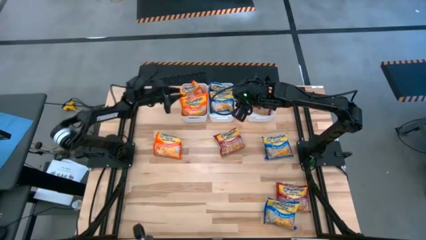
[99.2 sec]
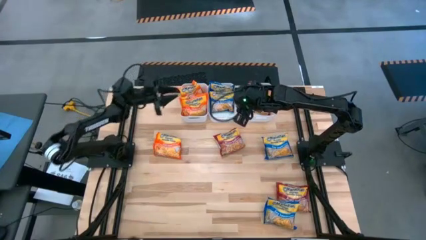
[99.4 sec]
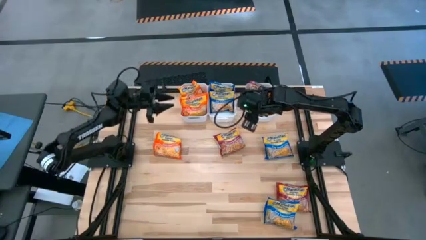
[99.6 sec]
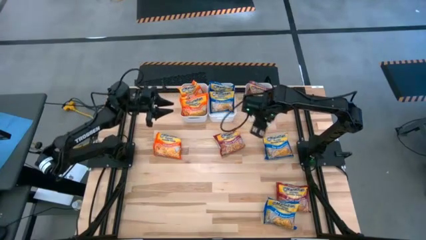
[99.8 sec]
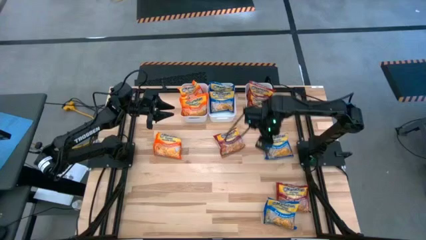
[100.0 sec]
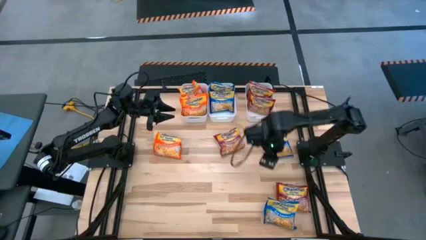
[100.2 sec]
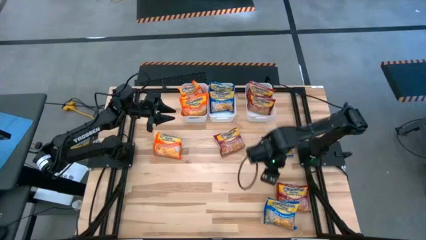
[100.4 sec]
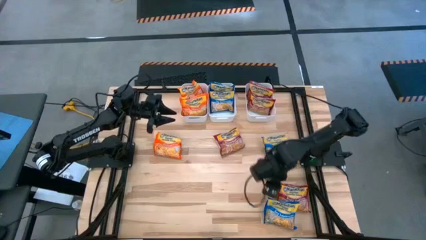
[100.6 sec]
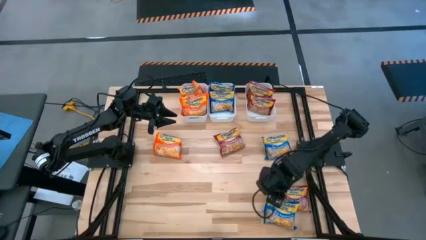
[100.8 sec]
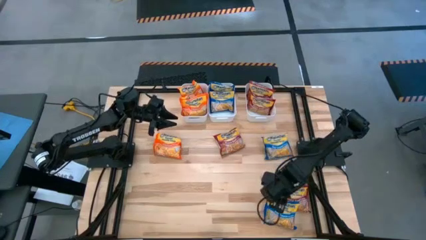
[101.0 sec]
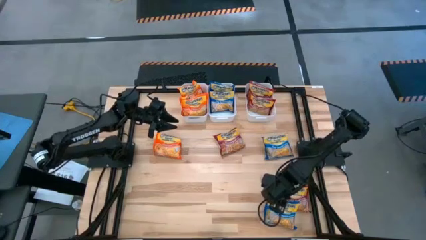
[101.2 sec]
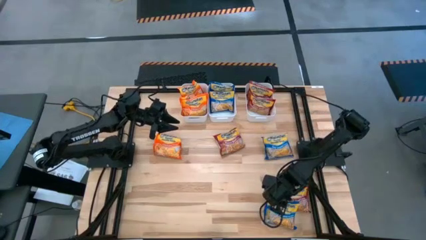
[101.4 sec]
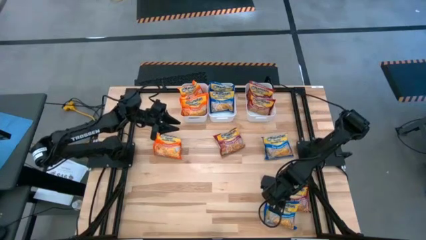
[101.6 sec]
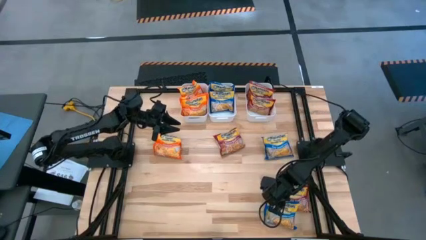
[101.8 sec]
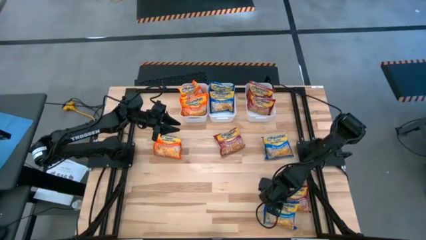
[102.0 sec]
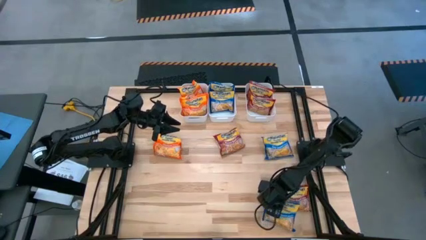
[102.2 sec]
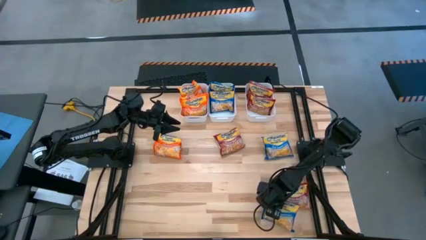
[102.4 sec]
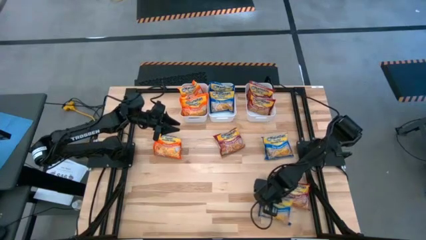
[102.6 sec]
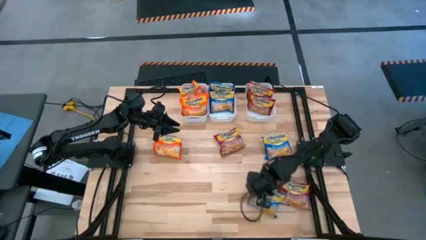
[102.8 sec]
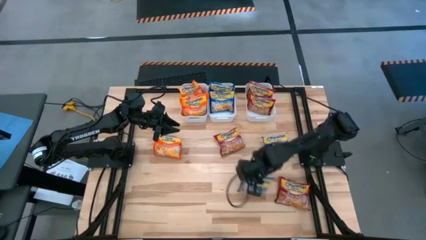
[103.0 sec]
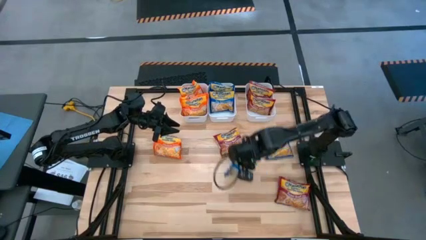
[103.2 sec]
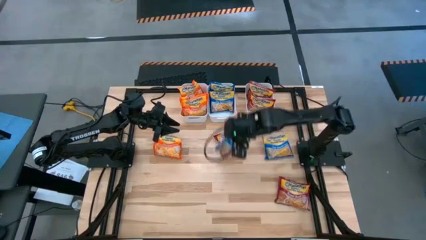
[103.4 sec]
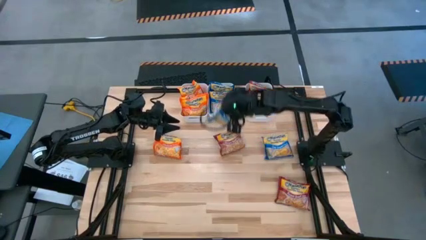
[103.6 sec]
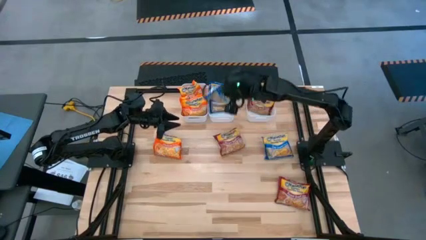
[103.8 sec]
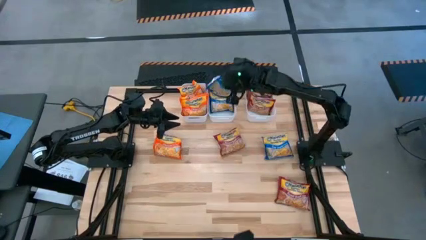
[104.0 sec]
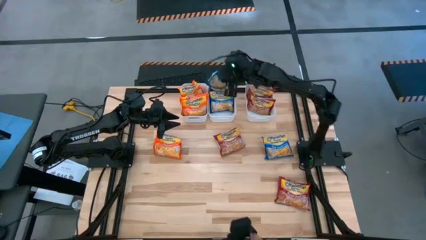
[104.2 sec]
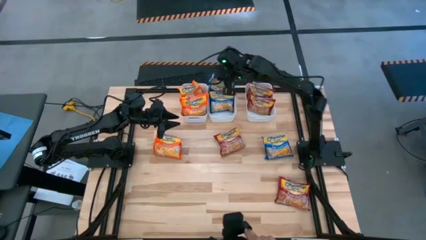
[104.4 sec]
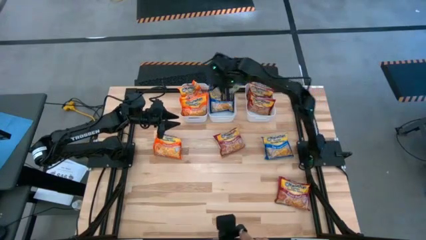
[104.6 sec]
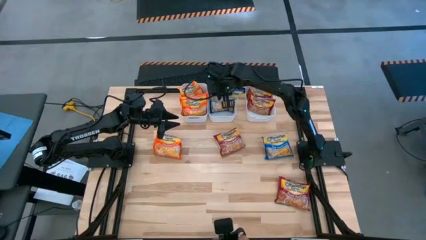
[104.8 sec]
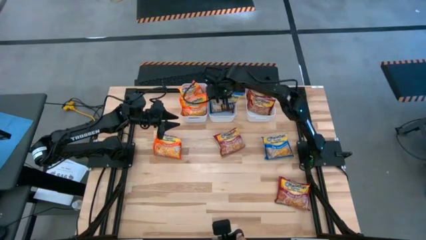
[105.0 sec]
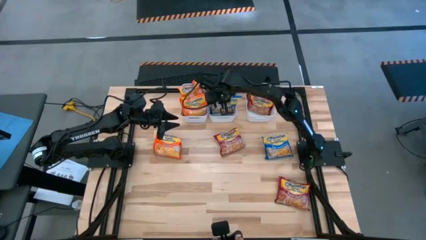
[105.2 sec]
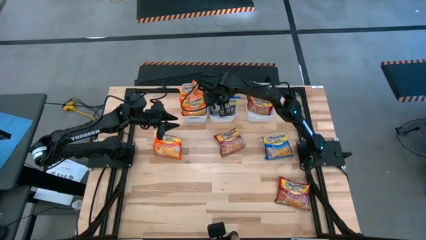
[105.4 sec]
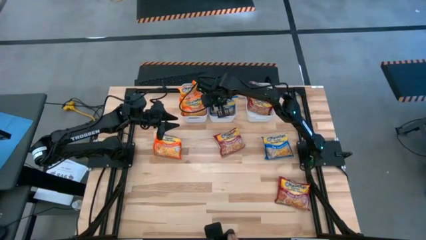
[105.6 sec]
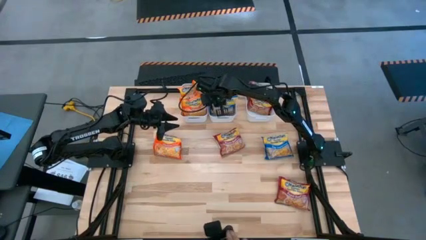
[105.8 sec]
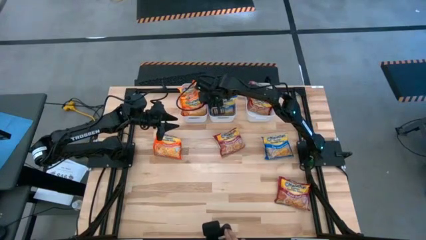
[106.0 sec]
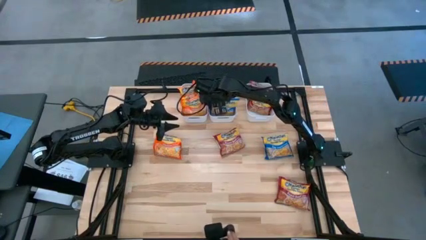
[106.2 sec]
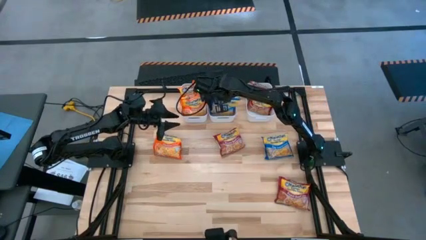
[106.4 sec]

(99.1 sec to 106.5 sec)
Task: Sort Maruchan noodles
Put the blue noodle pack into the middle white bin

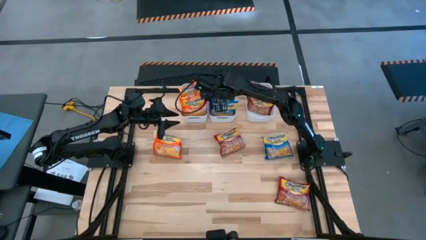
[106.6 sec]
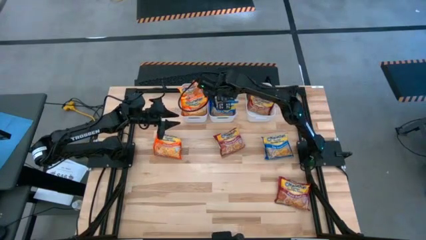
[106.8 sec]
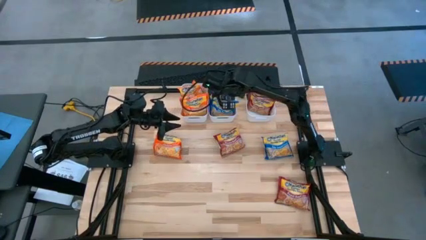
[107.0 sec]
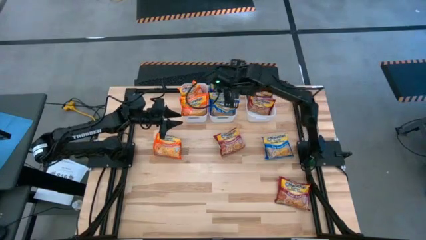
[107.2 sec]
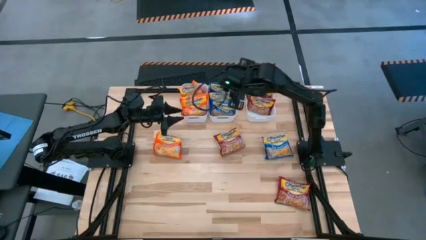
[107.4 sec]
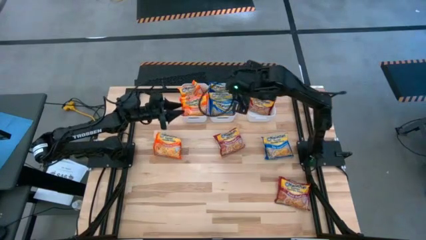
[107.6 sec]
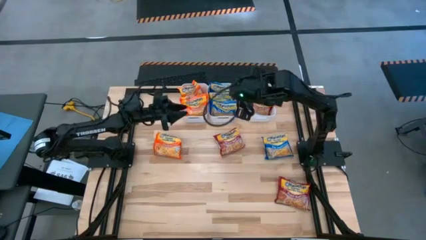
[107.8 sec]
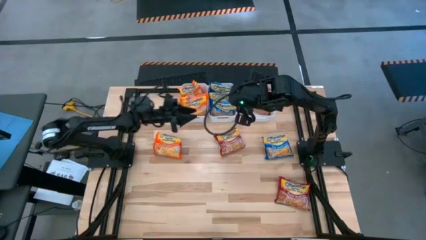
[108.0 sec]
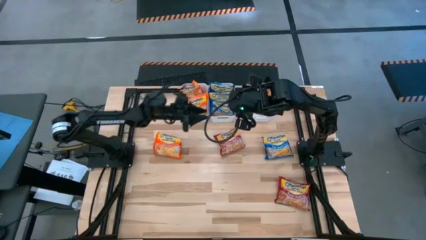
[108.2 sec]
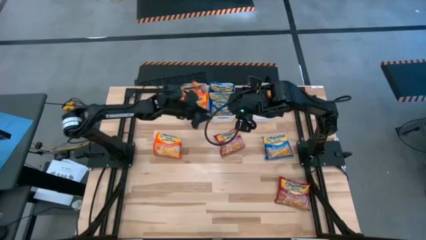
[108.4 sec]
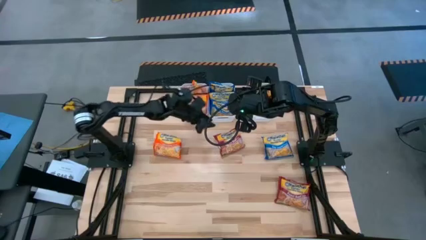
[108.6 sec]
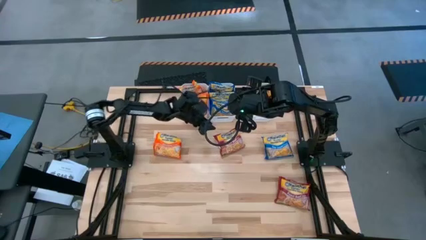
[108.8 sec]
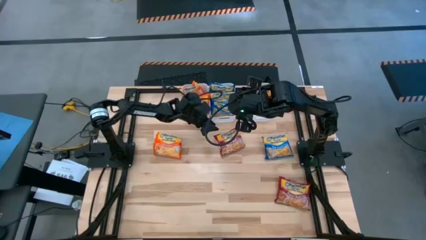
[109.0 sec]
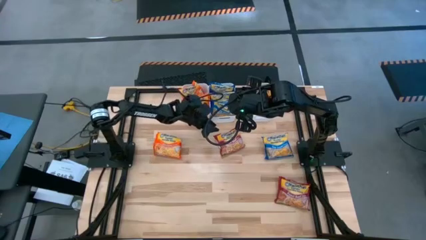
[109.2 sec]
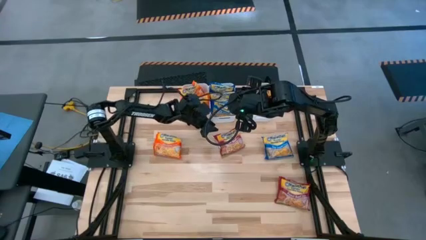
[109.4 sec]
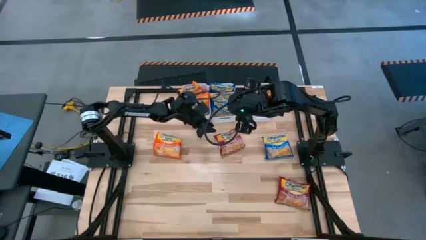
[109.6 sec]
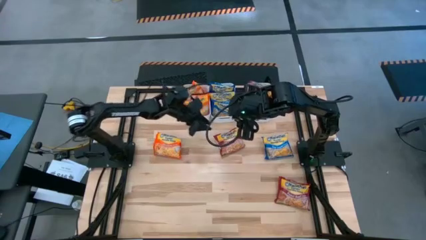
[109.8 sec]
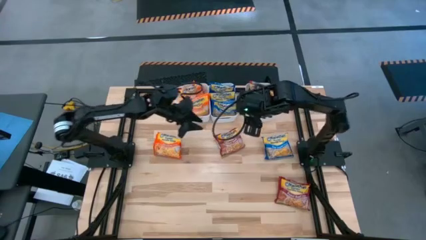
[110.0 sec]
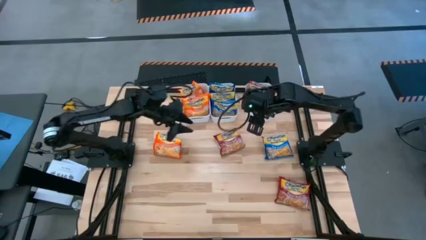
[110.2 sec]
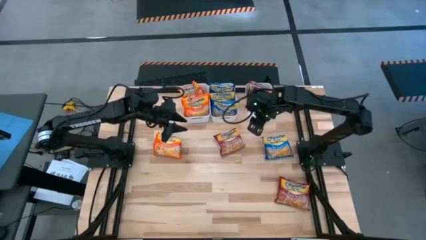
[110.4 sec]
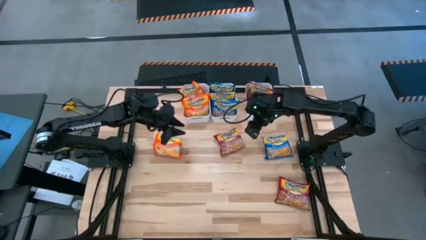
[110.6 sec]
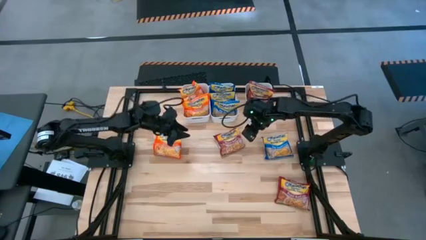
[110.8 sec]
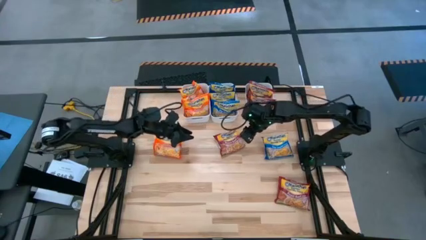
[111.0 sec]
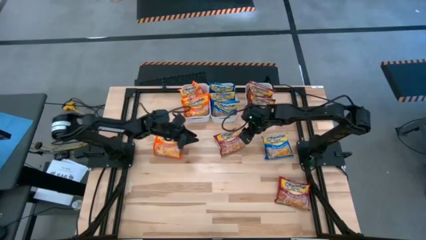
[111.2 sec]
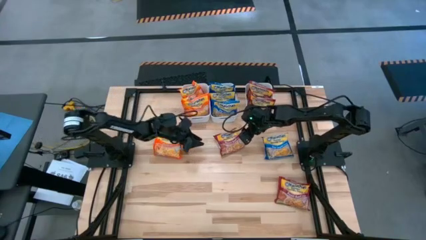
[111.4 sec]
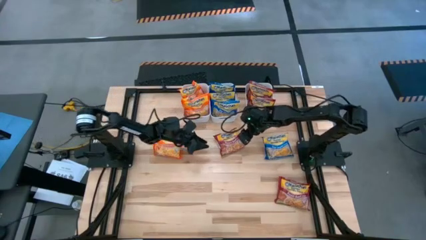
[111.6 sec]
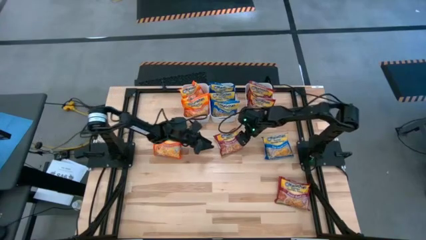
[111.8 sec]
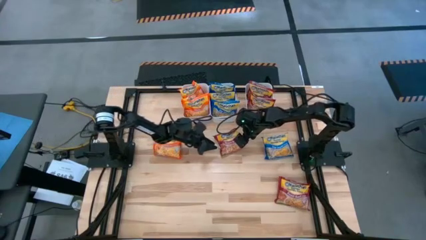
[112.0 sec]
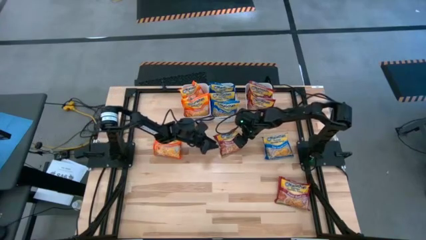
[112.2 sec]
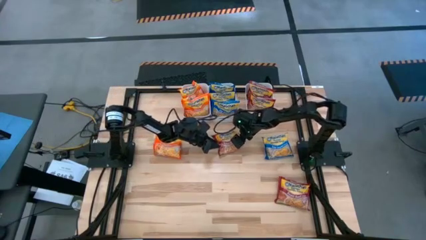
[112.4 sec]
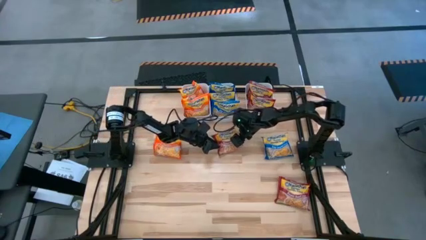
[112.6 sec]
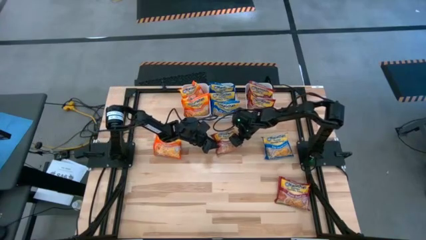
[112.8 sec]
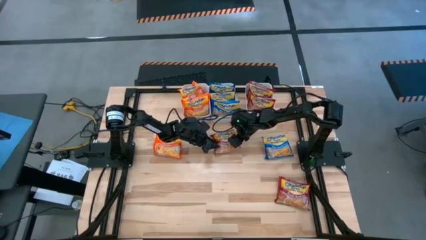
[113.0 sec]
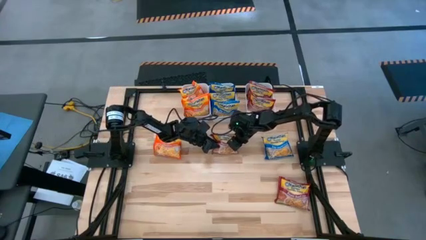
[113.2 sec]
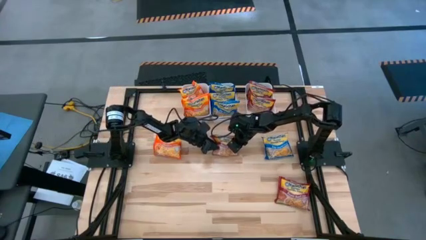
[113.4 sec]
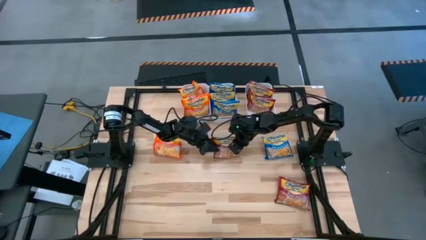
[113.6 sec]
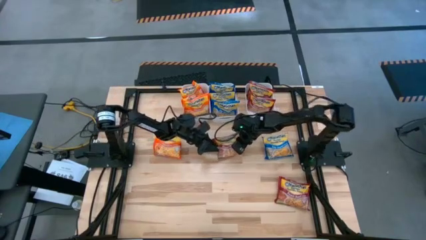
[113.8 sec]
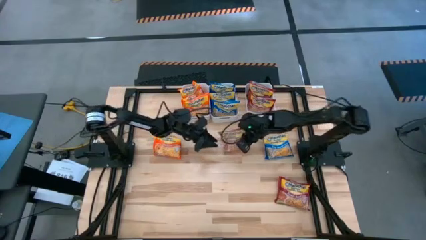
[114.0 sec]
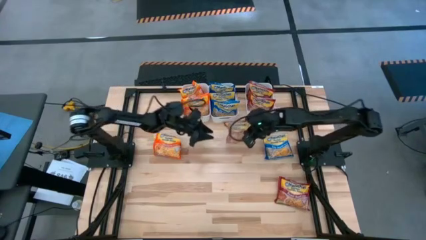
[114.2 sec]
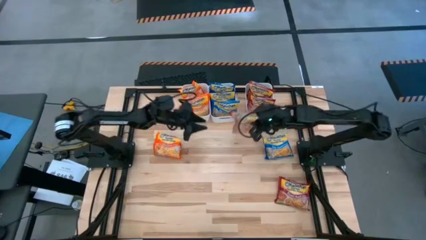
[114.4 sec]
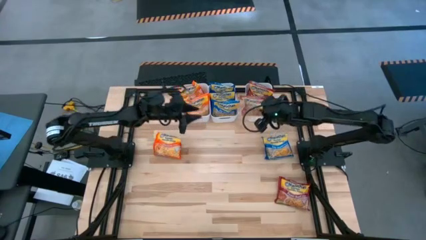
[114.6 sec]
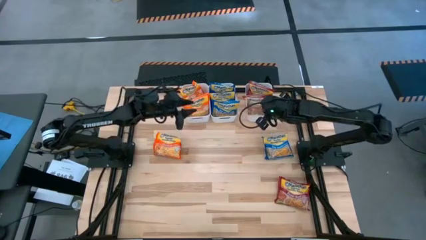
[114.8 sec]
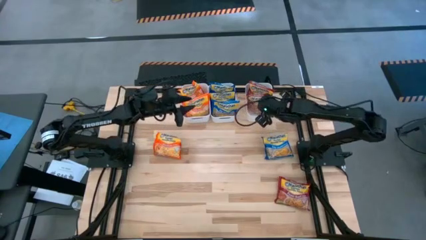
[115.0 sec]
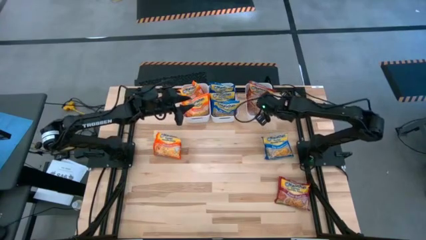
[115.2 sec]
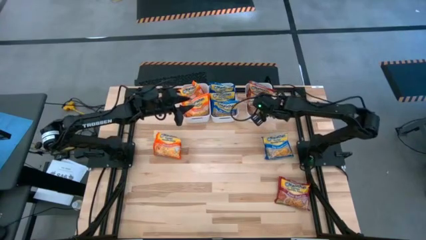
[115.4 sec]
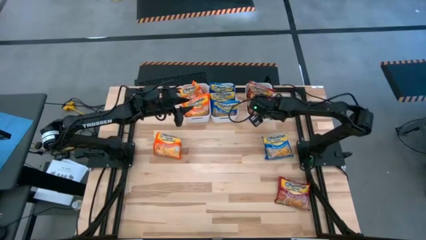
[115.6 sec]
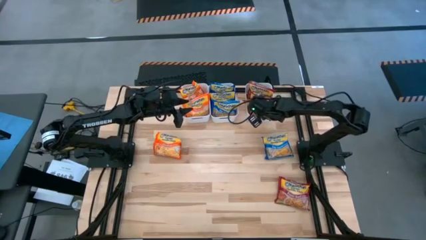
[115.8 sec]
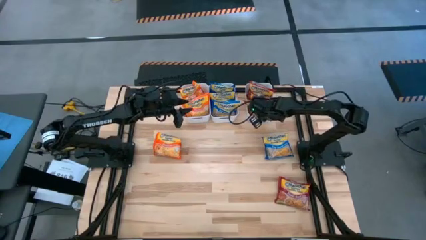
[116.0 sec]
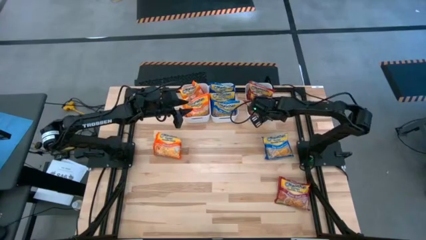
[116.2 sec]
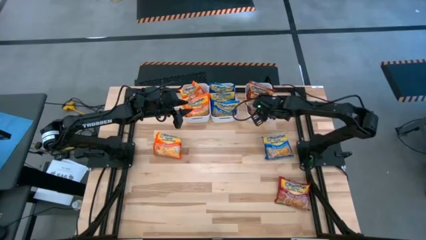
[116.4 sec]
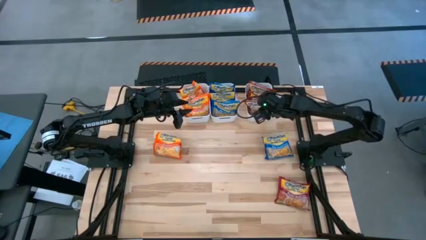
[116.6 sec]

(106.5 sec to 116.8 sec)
Put the red noodle pack into the right white bin
